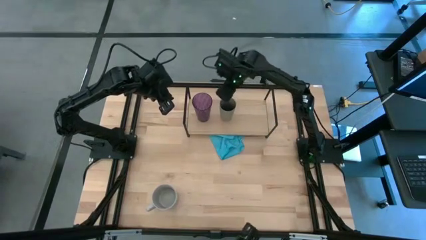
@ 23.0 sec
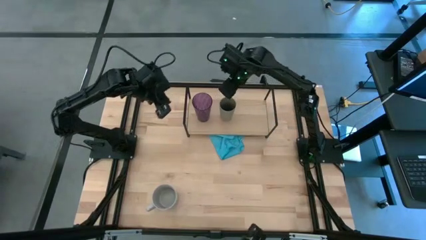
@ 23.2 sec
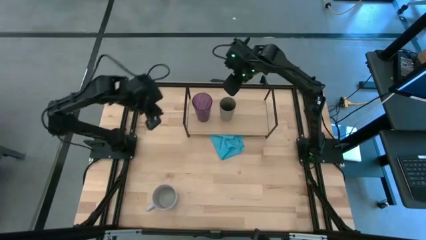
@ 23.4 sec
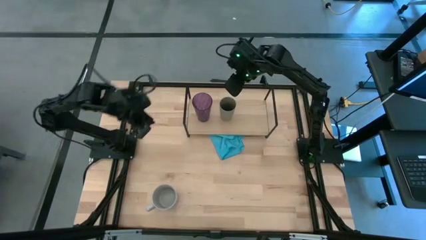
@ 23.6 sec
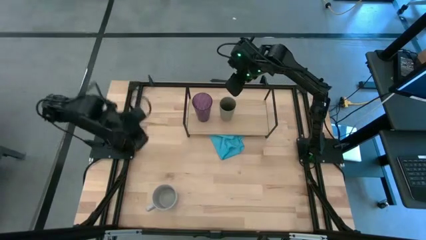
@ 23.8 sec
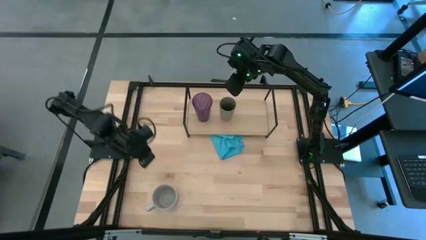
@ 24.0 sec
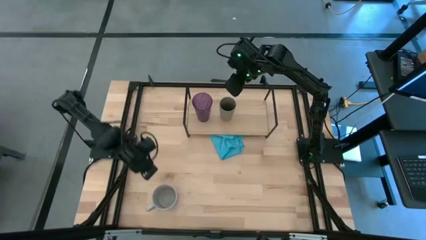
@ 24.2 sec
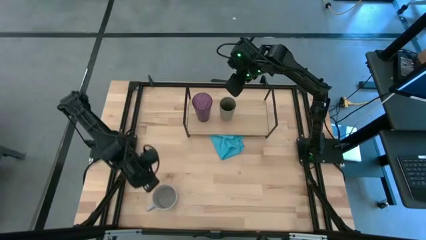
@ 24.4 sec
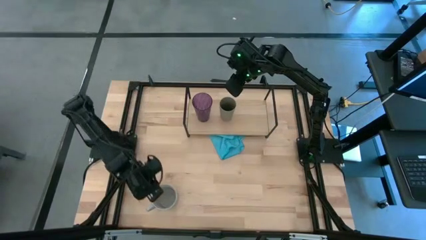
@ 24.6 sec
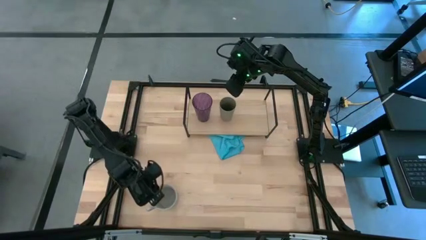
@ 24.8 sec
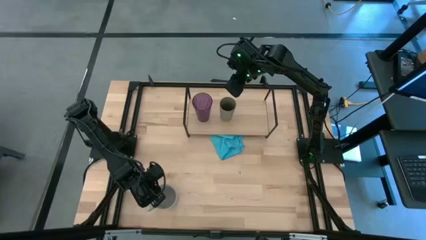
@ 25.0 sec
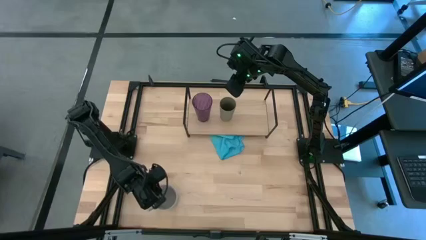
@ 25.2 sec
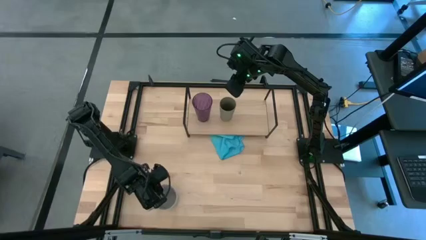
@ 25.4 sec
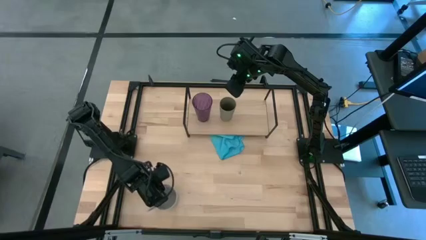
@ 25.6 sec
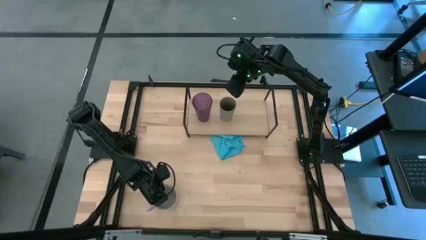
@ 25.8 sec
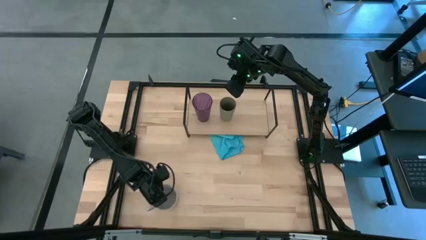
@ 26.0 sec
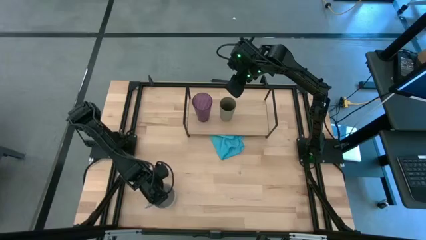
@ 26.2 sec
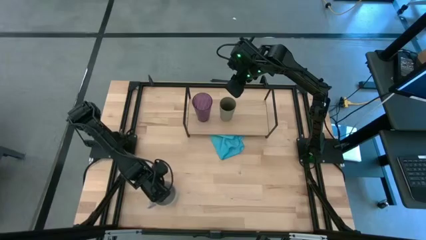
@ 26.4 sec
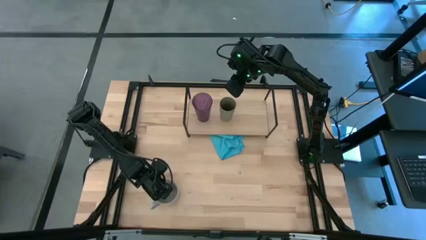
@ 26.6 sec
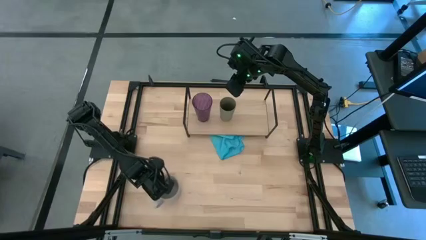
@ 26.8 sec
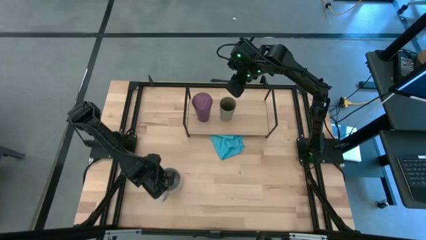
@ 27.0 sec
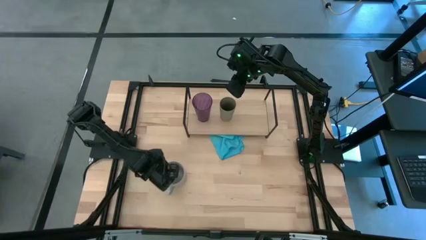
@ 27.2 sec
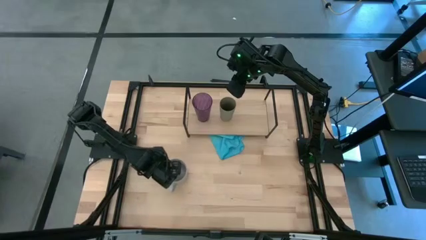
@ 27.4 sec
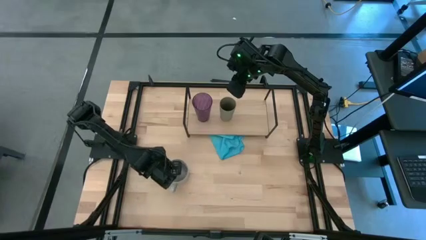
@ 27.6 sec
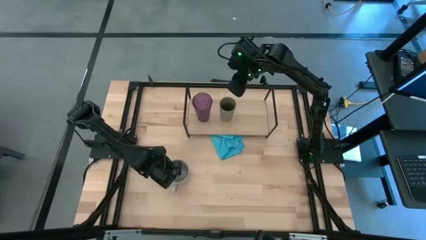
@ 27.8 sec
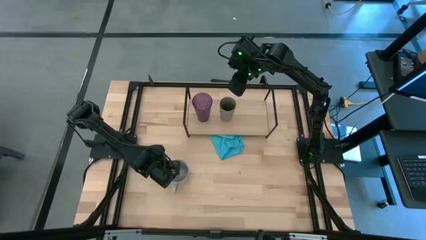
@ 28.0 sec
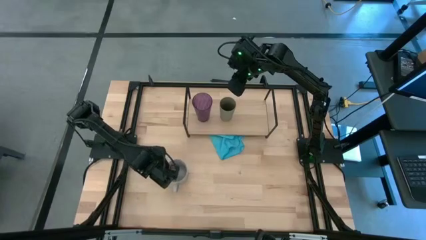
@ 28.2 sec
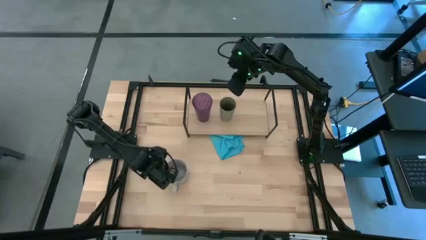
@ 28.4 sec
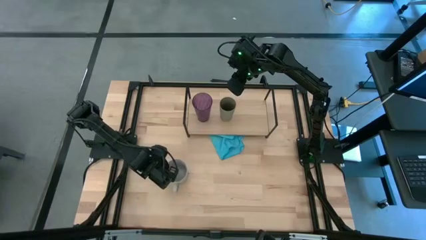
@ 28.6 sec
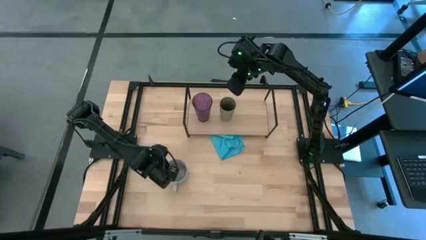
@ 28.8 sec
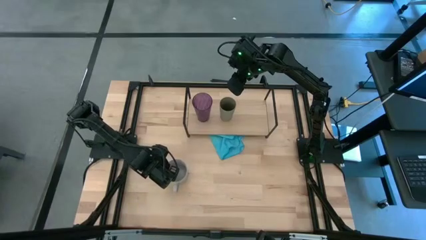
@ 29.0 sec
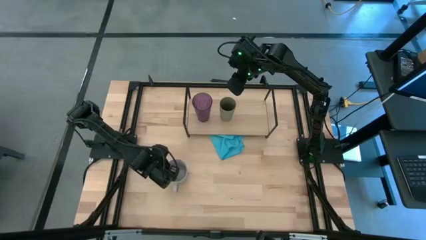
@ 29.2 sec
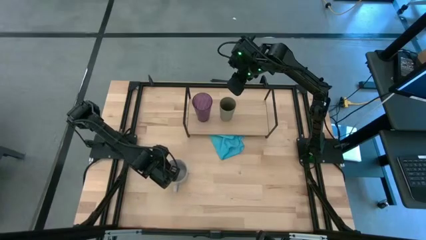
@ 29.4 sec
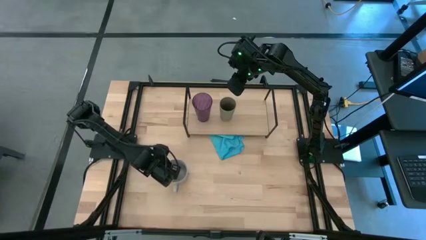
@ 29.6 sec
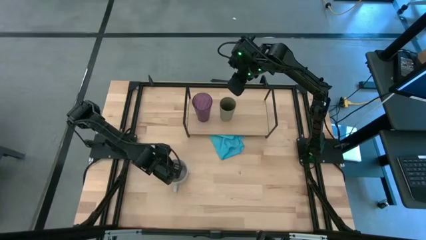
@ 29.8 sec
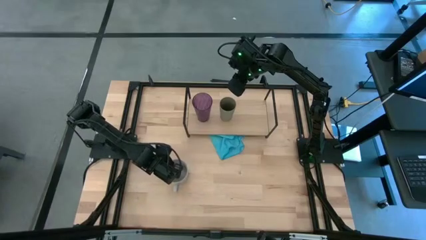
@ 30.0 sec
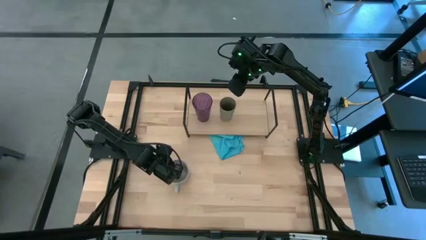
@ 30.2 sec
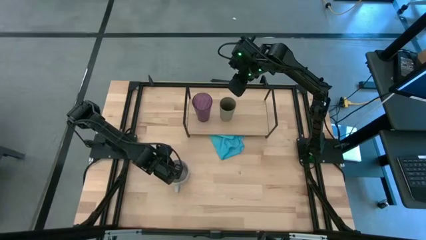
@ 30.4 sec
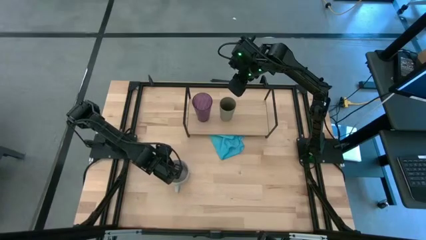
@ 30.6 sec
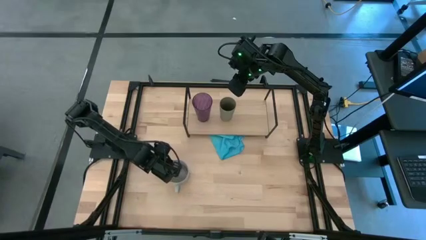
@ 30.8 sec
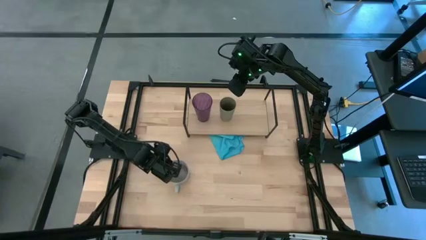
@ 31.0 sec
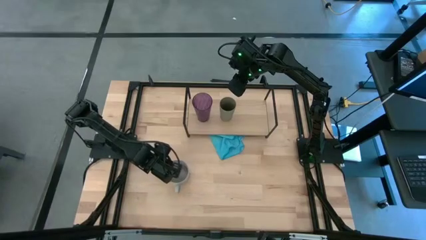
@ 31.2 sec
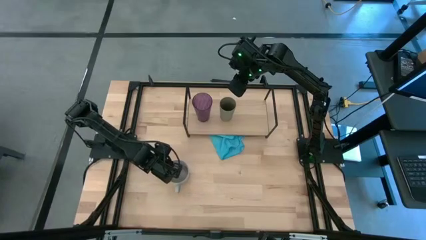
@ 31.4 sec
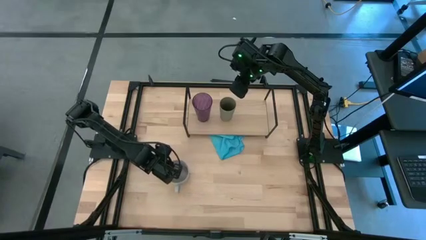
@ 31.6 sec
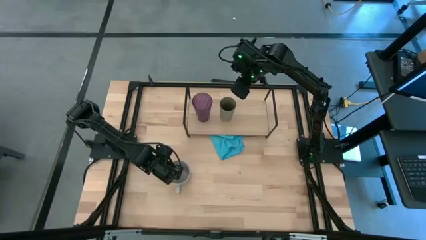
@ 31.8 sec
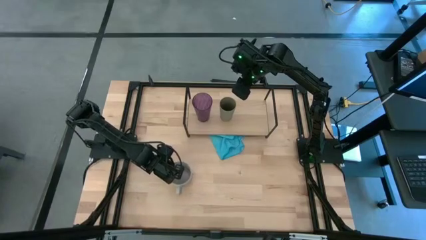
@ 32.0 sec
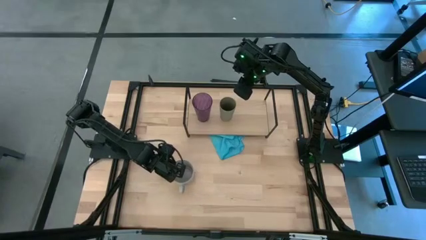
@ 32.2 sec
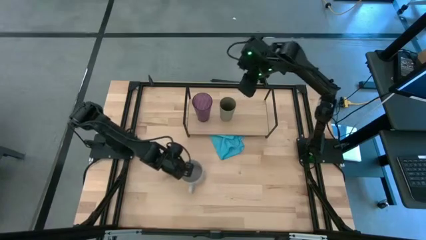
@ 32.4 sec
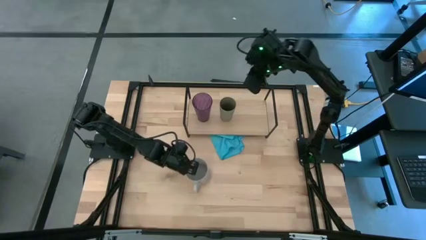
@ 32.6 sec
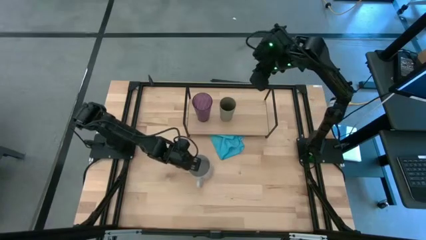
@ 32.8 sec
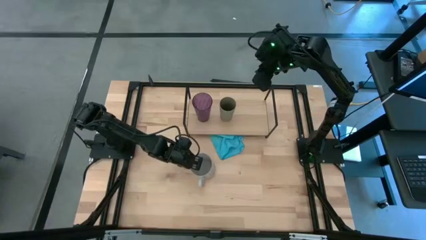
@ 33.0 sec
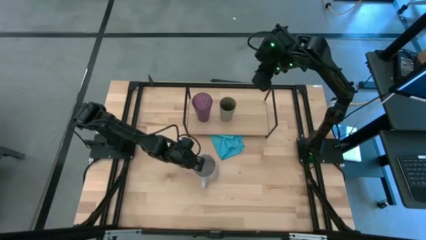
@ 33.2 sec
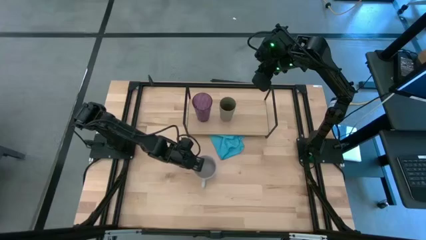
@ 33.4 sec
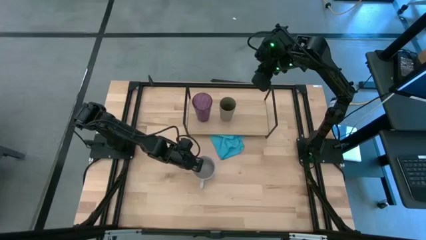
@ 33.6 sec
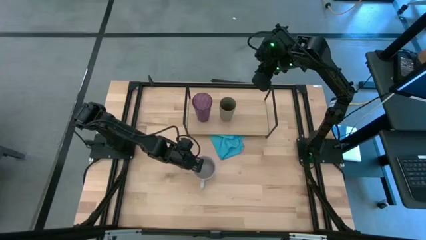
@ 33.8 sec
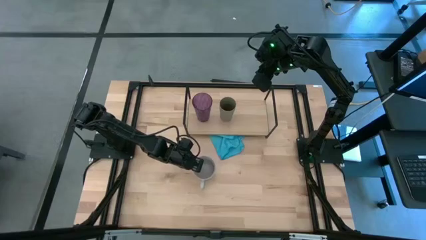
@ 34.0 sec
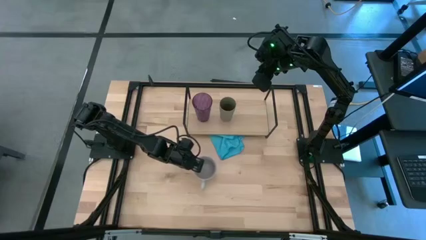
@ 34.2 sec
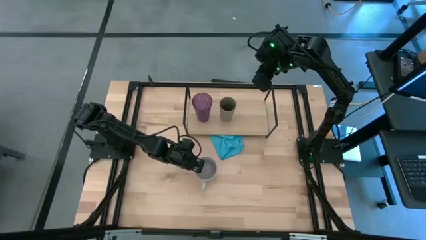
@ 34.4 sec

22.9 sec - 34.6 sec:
Task: Stack small to large cups/mugs on shelf
Put the gray patterned mug on the shelf

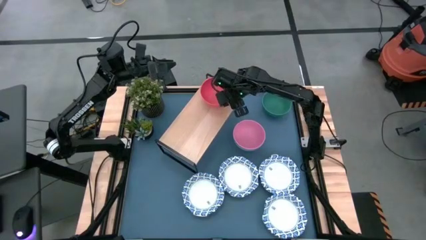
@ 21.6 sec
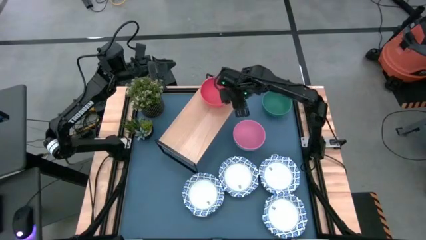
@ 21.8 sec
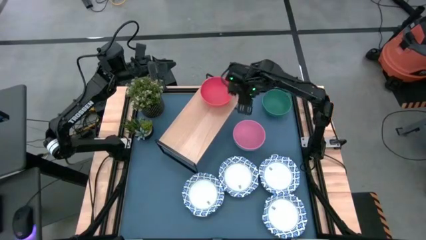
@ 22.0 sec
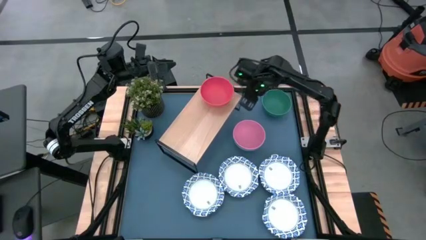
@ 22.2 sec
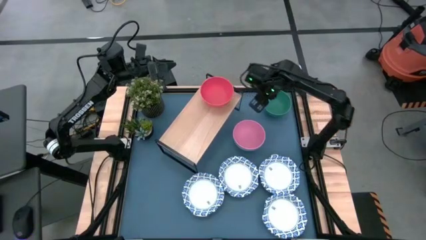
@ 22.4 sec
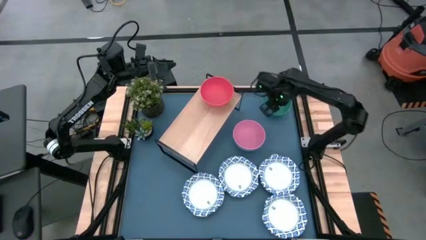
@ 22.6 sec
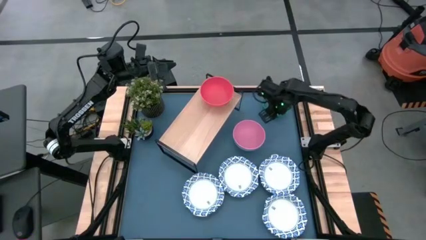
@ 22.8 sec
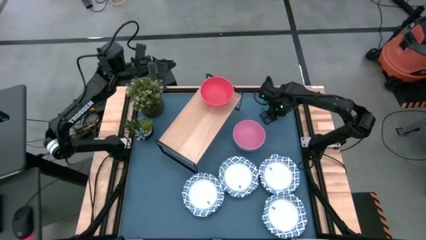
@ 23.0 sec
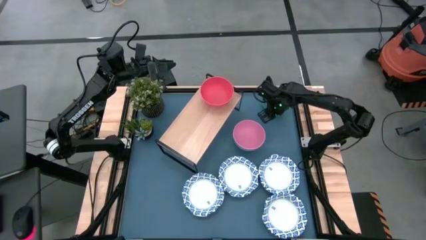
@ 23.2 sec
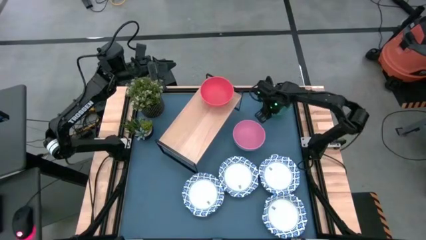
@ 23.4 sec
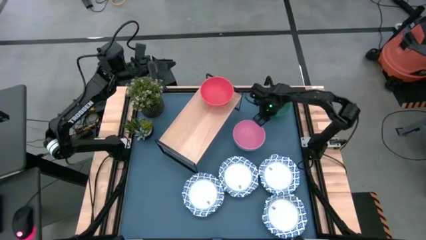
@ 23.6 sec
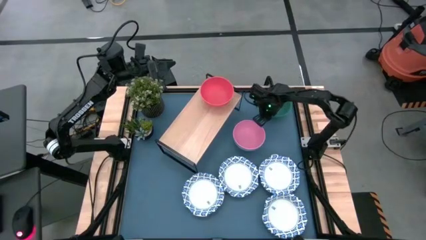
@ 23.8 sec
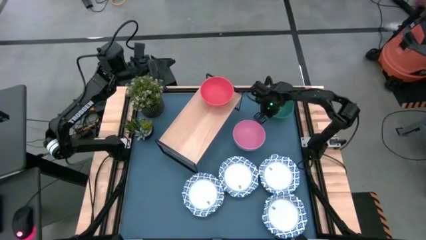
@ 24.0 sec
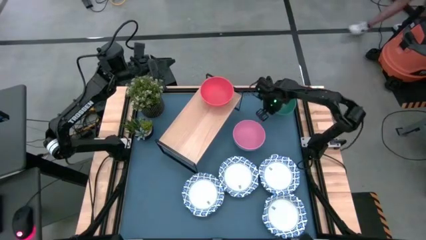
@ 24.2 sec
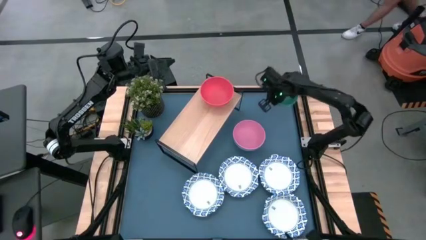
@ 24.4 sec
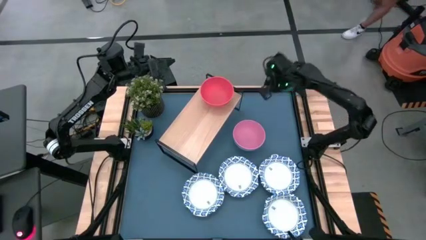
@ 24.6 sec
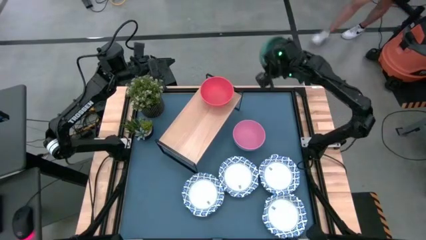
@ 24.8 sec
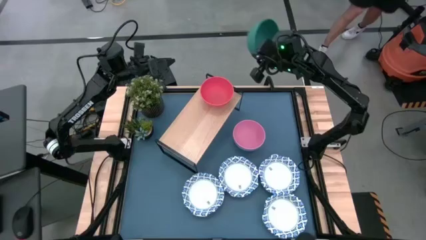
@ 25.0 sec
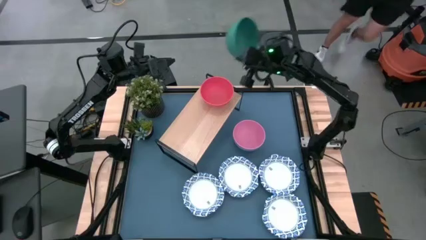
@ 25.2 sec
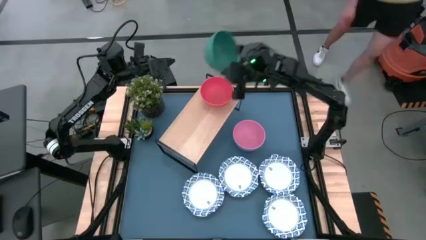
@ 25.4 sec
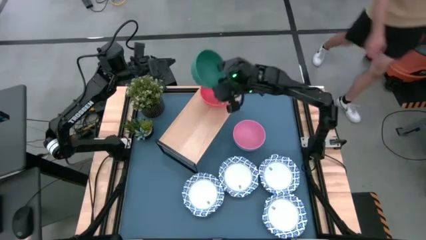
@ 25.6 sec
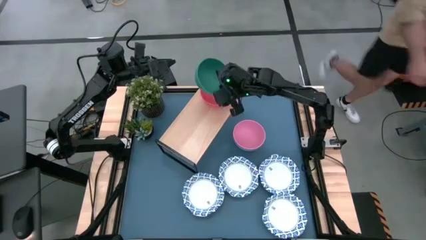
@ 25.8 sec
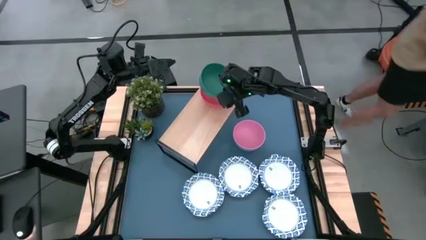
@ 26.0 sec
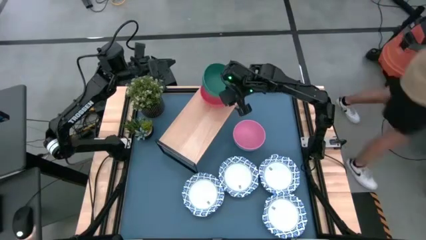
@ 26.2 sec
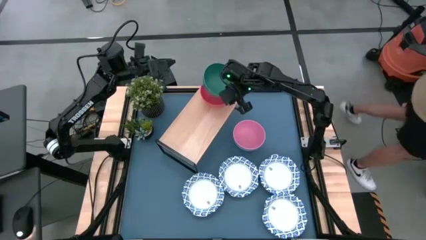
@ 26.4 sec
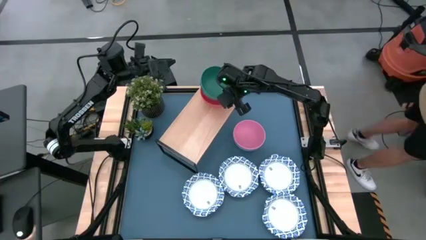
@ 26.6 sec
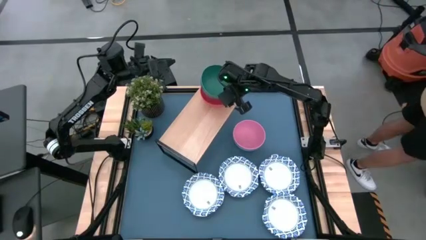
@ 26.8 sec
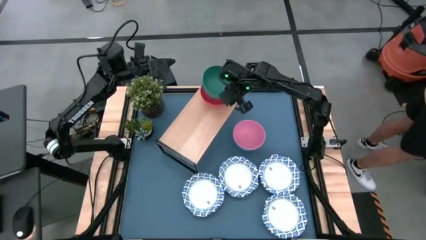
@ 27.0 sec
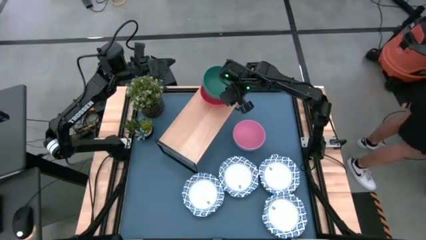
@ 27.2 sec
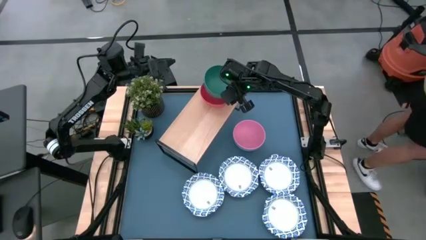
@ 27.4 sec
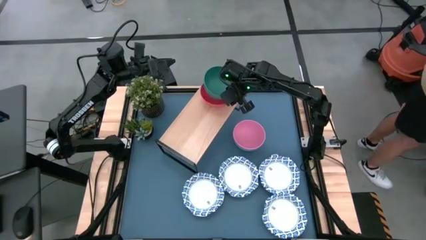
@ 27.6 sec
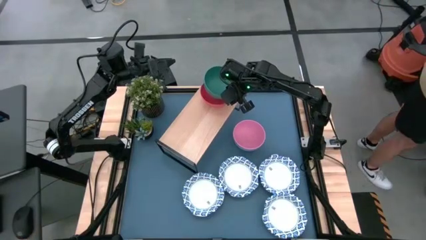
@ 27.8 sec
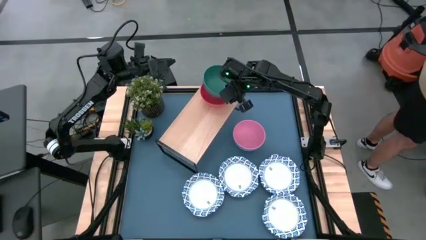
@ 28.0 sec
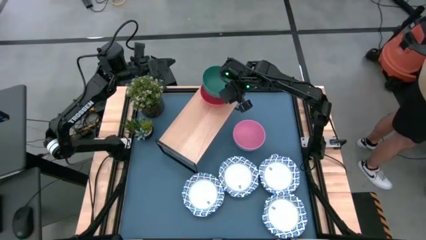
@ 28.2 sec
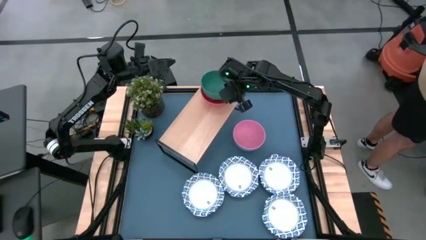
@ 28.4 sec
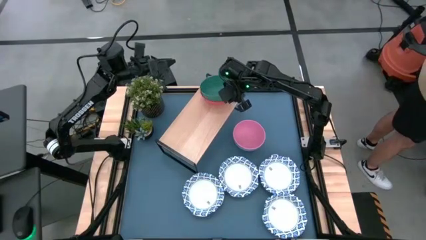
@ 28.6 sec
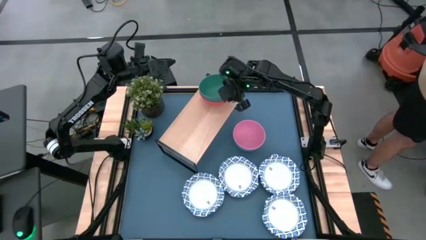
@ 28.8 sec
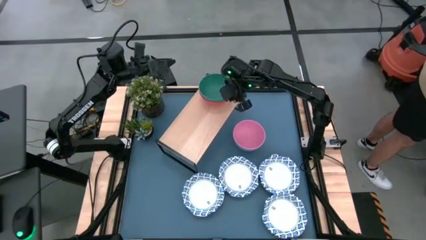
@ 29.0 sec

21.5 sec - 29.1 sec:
Task: Place and stack bowls onto a shelf
Stack the green bowl on top of the orange bowl on the shelf
